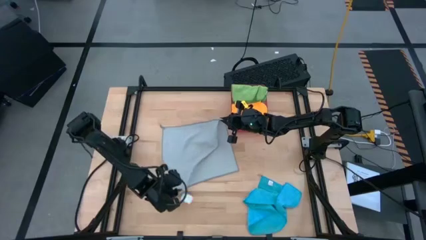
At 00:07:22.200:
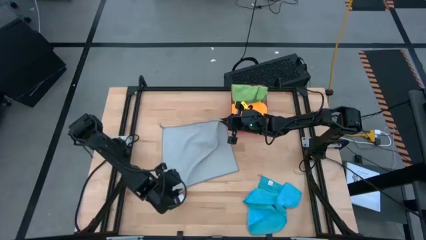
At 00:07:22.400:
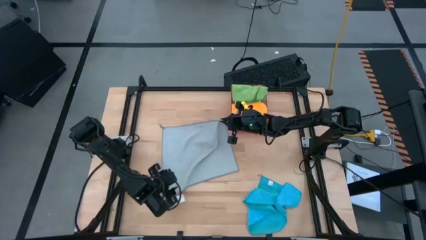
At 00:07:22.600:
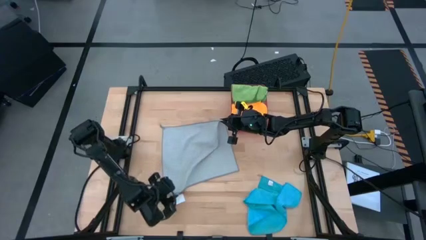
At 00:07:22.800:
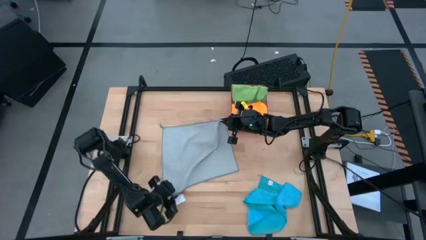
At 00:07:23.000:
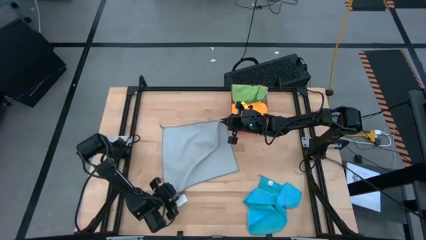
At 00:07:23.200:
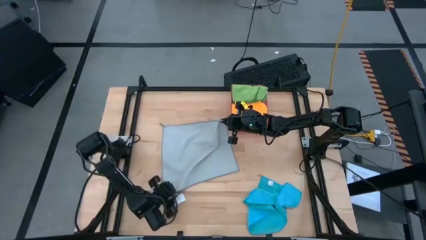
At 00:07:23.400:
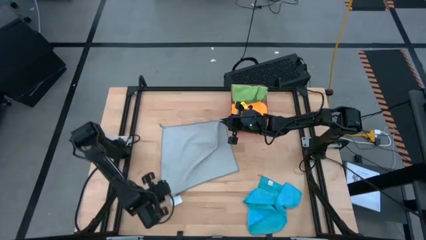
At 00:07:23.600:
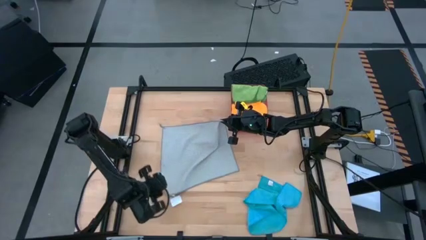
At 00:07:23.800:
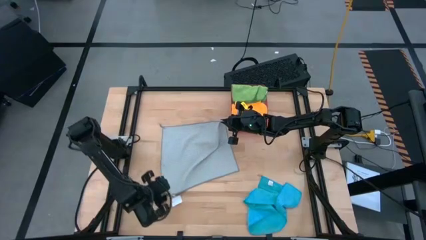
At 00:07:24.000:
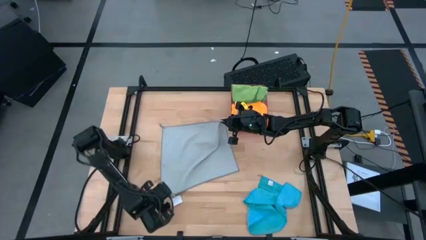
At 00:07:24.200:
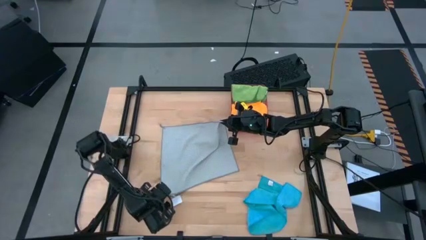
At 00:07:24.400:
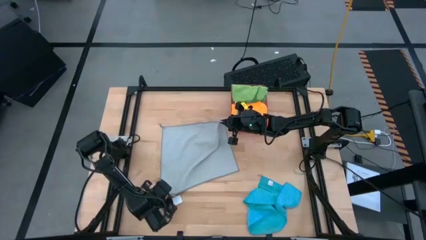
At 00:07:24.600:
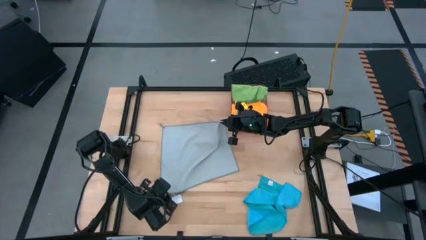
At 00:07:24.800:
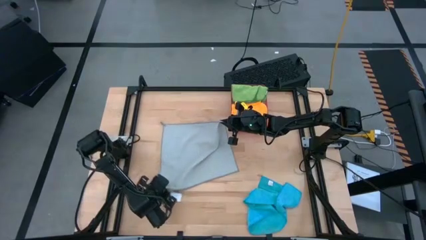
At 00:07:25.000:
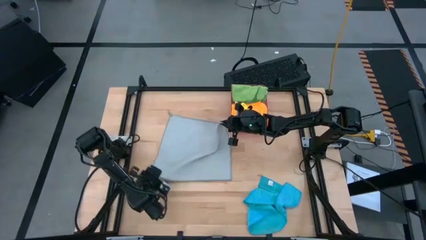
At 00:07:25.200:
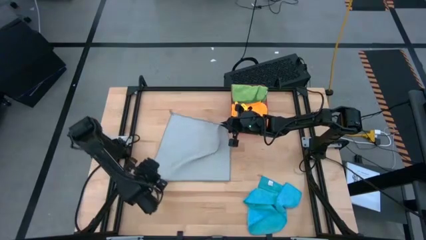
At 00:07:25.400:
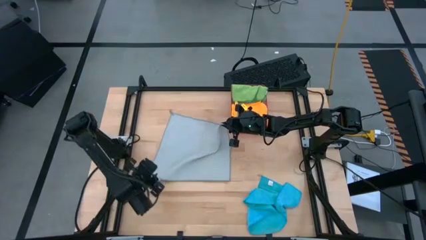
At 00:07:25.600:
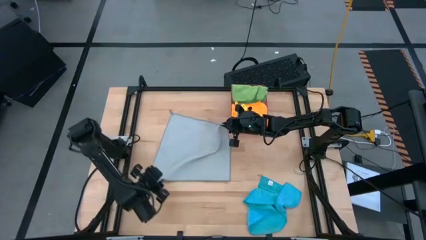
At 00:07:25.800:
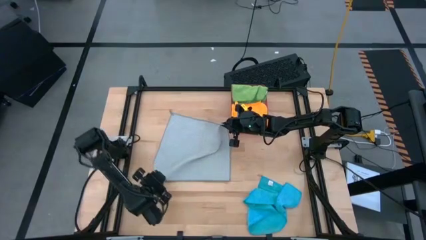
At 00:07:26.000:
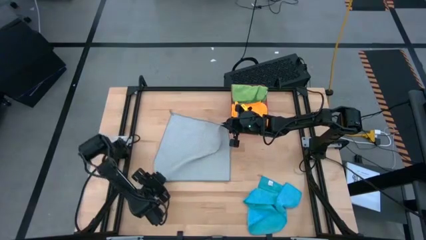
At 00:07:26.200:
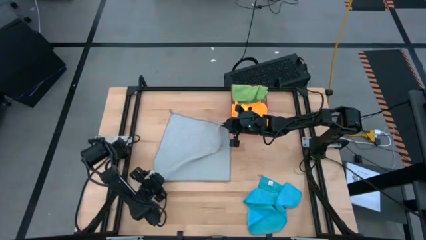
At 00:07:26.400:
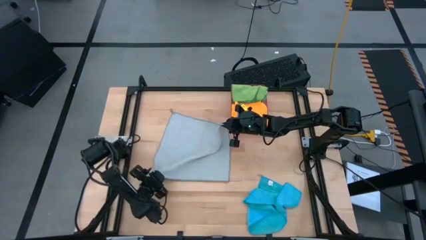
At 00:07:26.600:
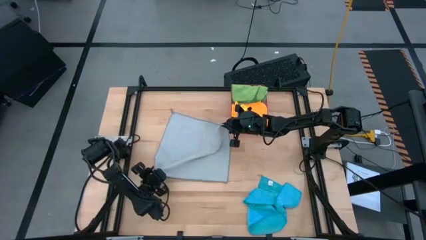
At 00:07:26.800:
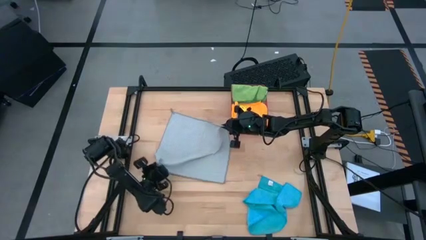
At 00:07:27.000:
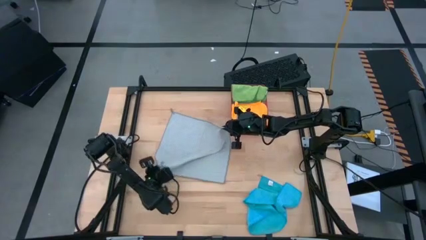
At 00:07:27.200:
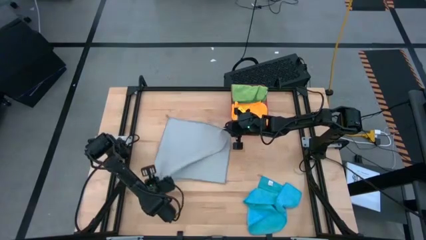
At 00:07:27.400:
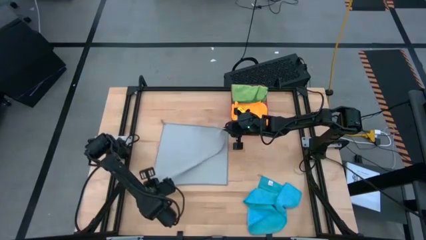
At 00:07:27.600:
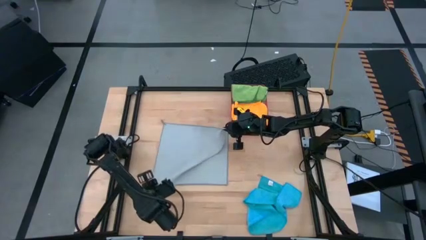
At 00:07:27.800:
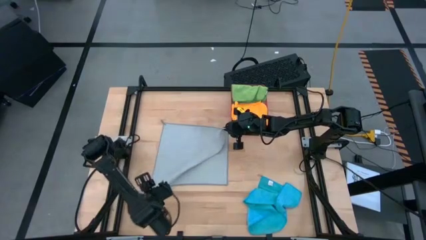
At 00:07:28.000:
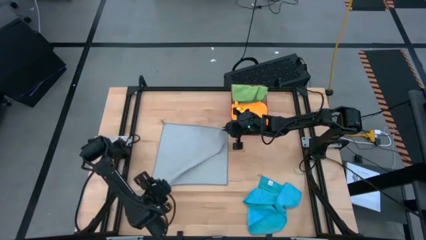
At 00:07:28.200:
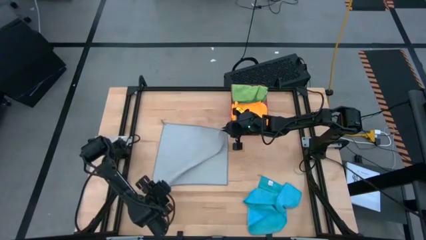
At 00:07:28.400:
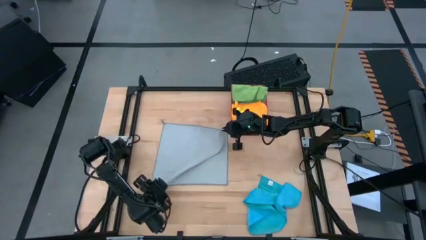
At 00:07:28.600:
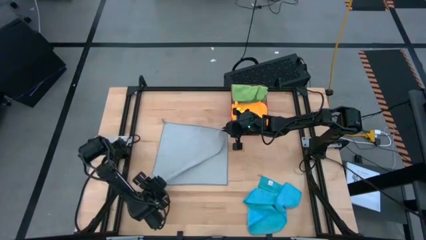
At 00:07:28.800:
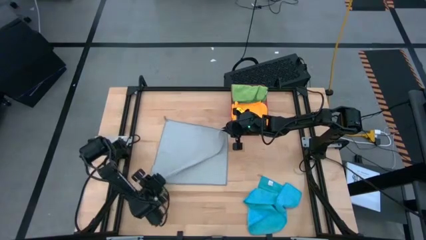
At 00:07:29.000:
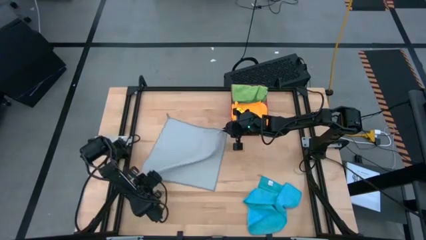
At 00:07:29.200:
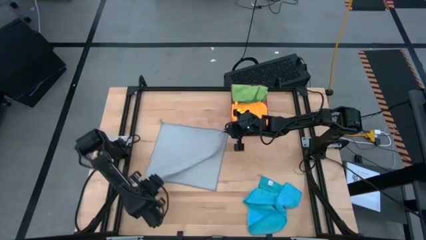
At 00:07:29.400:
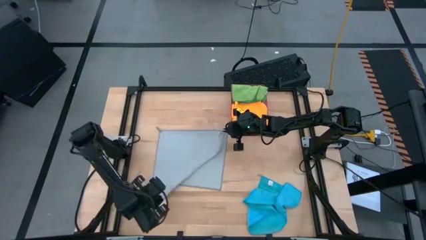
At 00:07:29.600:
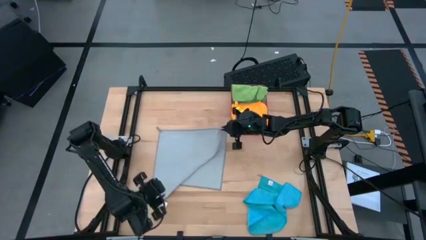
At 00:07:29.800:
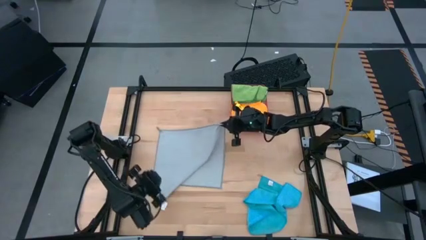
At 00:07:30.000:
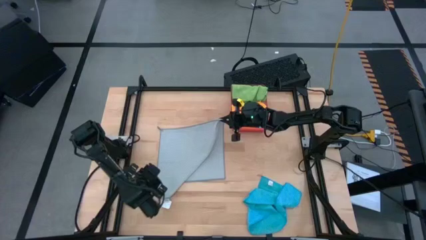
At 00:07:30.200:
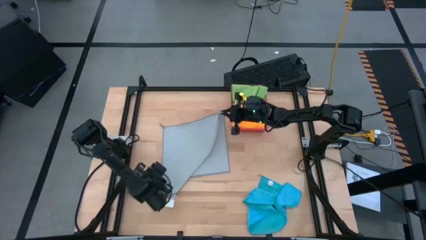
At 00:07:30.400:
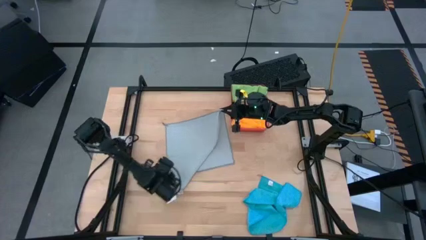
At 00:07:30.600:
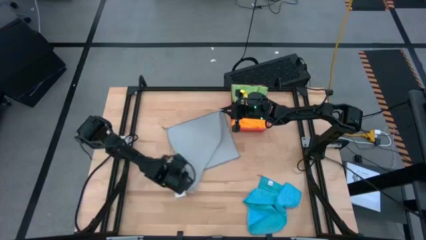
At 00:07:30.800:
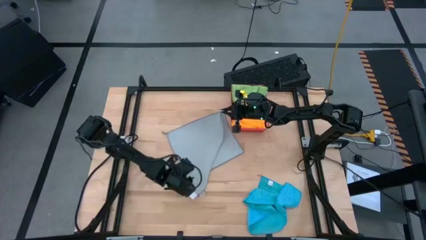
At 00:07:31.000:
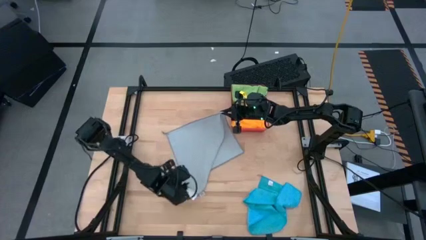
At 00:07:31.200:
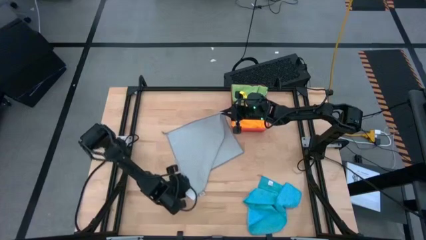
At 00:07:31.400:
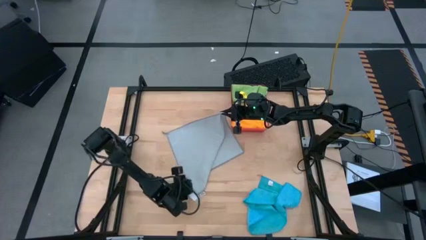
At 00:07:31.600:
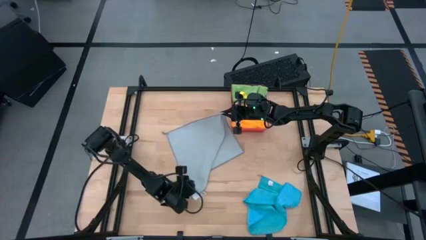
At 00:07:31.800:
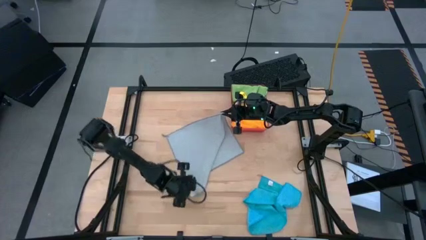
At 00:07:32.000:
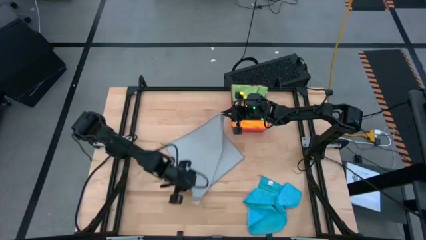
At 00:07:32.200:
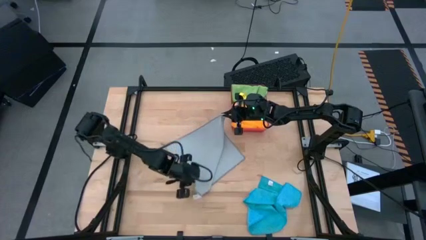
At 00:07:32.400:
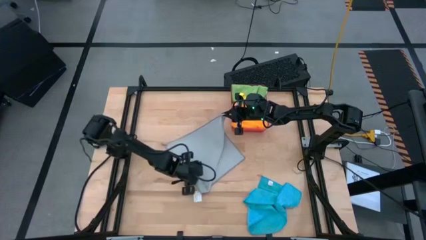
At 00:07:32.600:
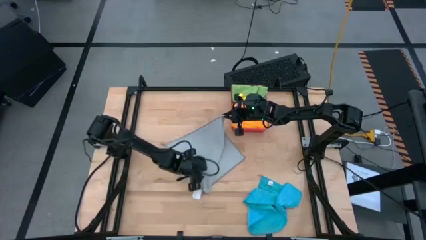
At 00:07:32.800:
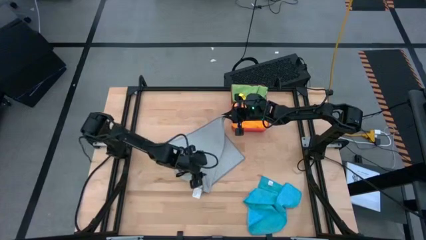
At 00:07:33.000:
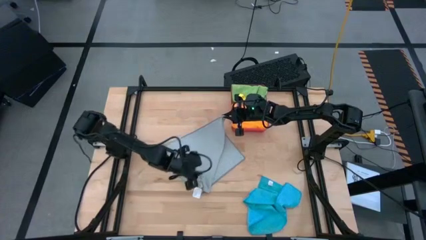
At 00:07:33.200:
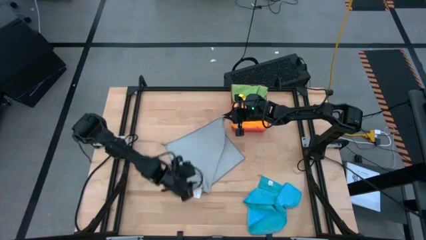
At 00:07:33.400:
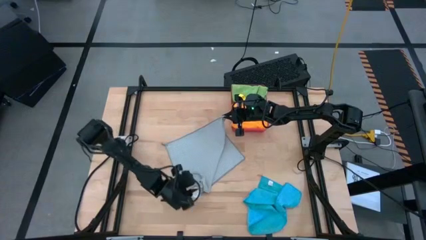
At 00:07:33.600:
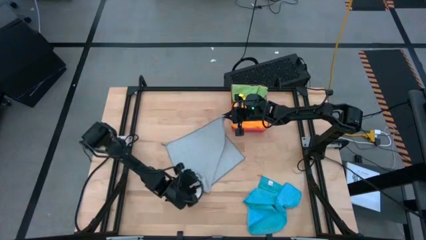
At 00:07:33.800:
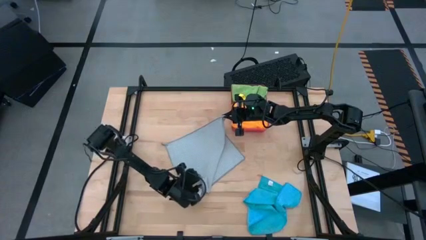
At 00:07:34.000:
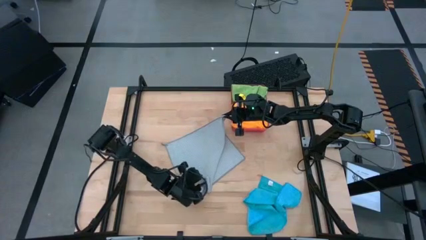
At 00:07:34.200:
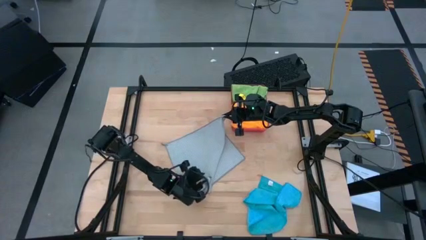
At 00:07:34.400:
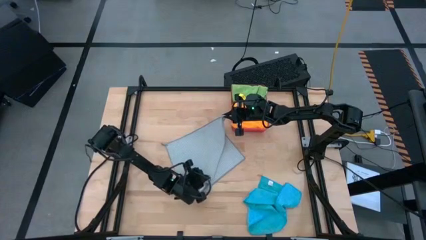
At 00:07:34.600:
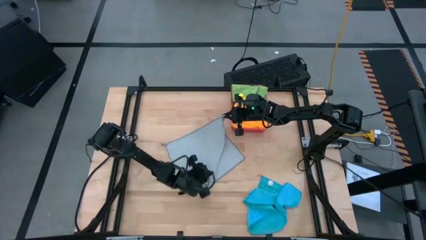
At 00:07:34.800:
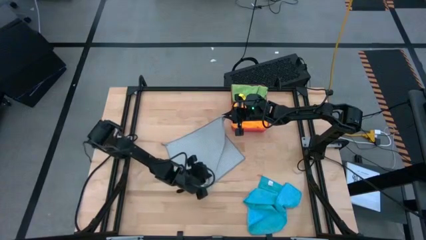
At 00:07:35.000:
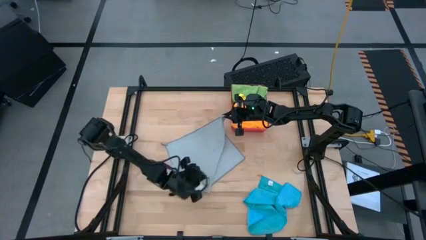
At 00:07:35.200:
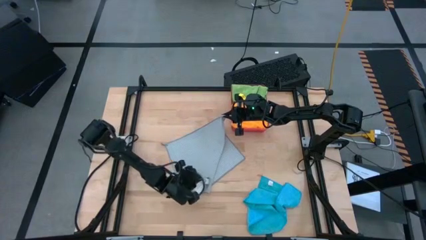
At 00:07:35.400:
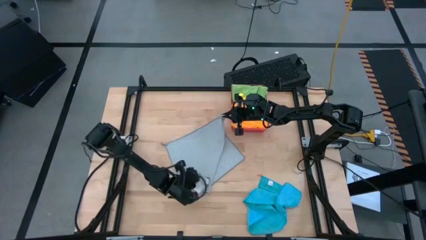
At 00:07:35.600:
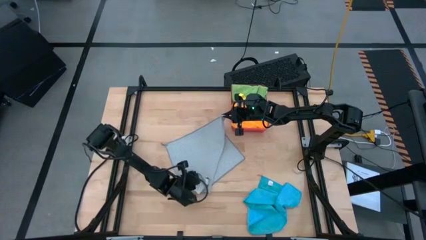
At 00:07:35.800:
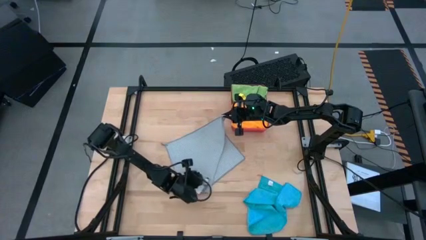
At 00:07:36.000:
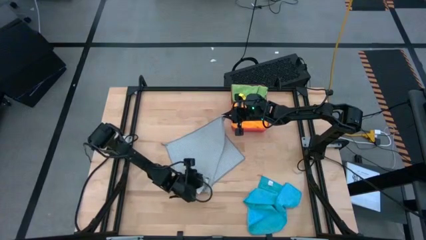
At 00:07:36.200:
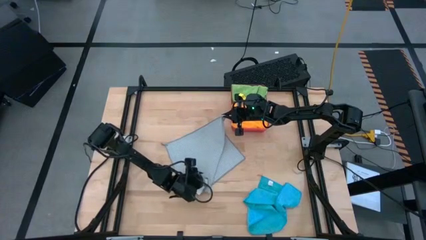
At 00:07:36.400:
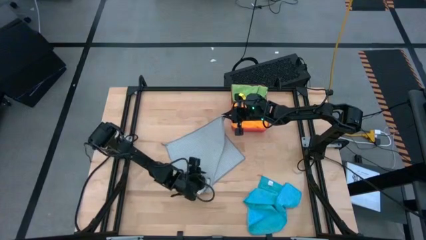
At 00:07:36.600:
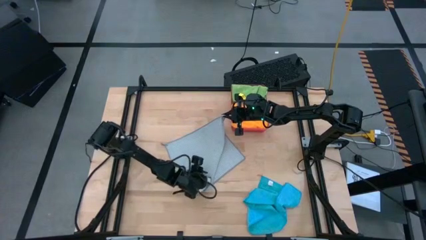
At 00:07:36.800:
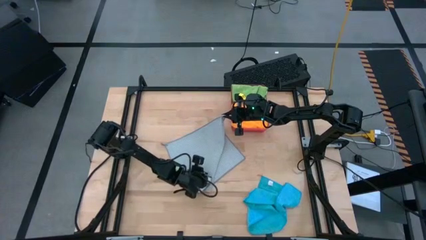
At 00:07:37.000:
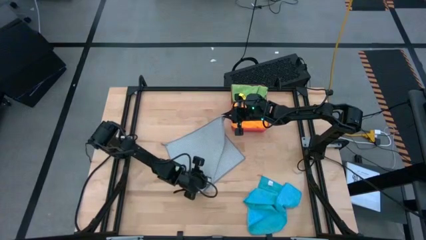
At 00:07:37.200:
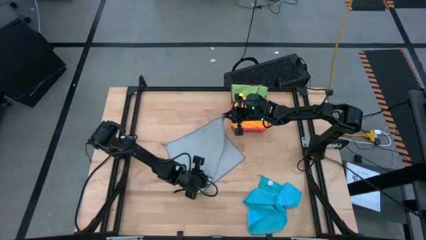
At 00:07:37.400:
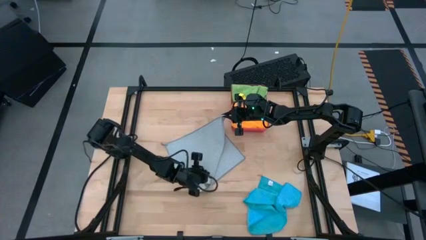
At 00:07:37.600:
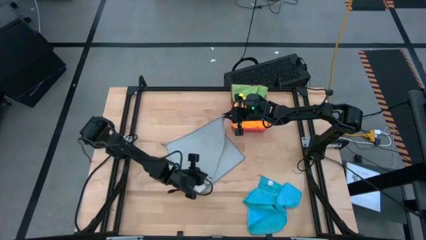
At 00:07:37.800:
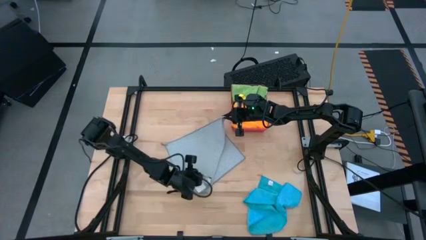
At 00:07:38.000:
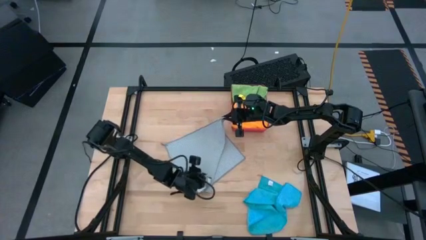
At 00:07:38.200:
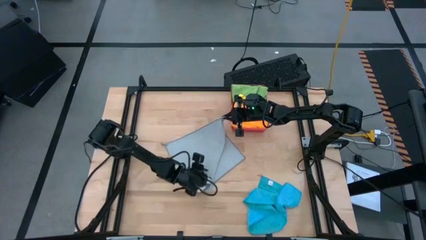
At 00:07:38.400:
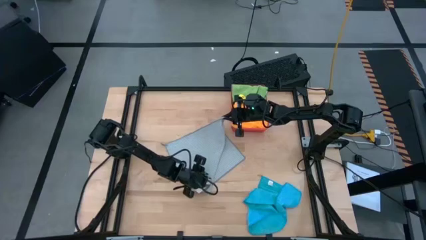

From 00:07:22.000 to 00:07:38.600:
Task: Fold microfiber towels
Fold the gray microfiber cloth
